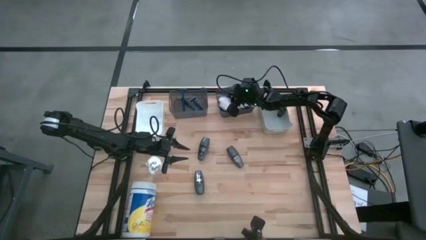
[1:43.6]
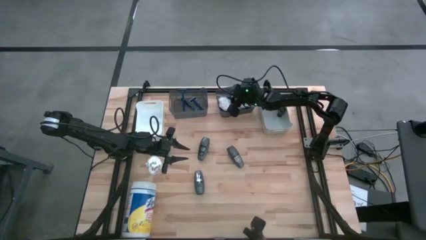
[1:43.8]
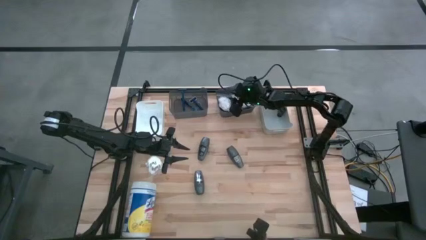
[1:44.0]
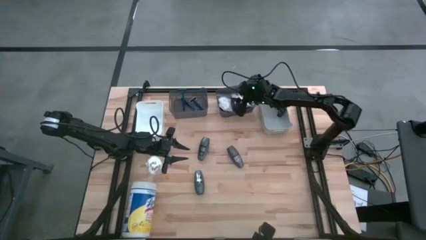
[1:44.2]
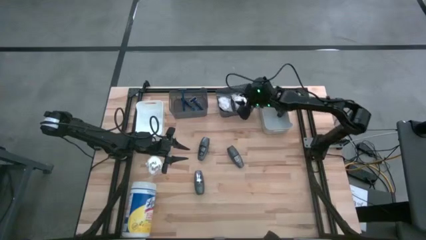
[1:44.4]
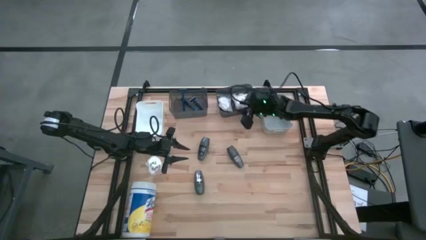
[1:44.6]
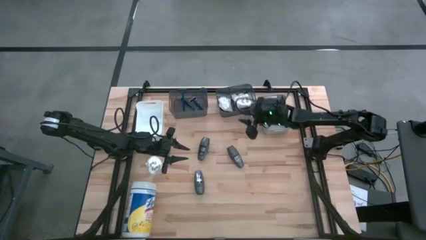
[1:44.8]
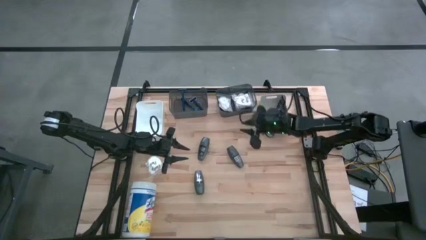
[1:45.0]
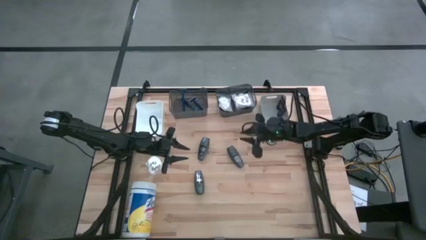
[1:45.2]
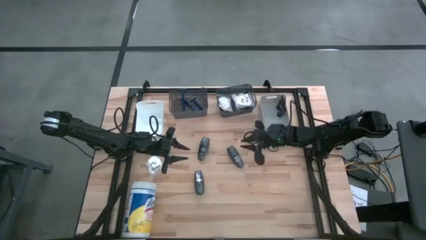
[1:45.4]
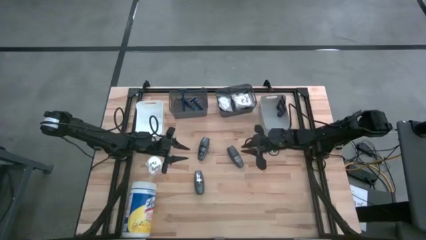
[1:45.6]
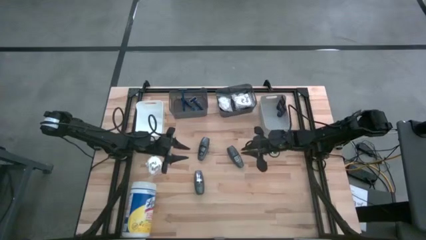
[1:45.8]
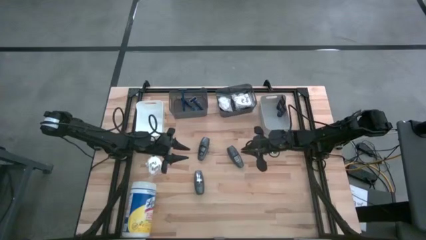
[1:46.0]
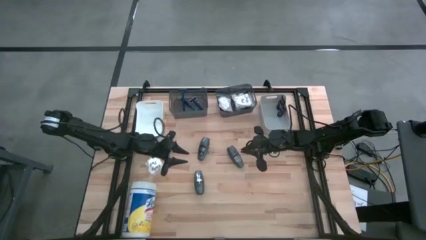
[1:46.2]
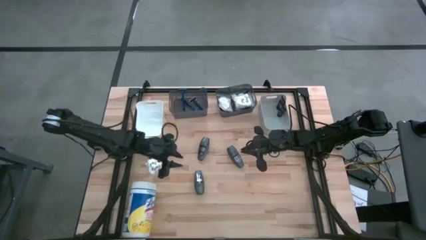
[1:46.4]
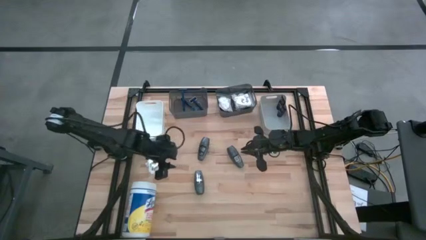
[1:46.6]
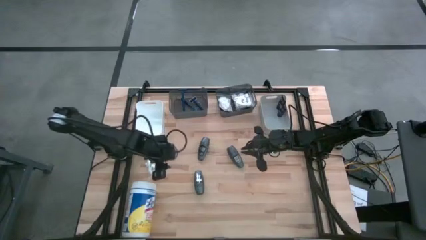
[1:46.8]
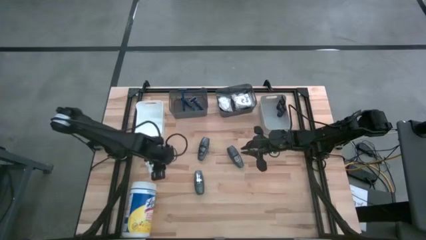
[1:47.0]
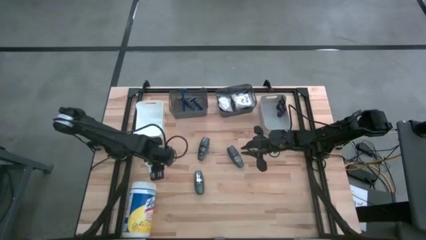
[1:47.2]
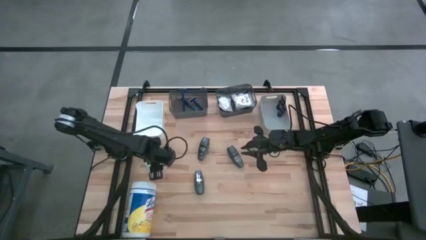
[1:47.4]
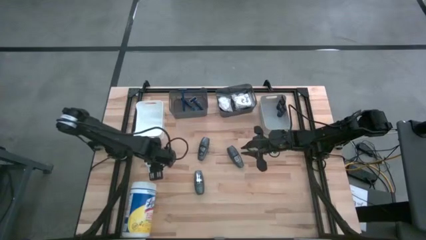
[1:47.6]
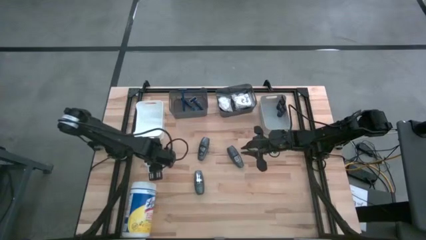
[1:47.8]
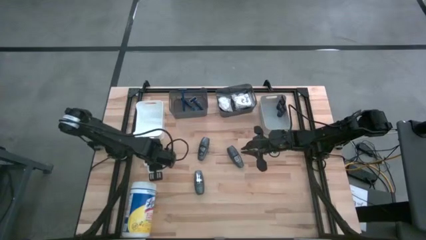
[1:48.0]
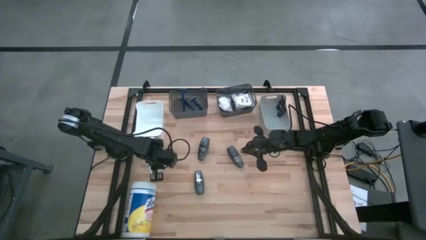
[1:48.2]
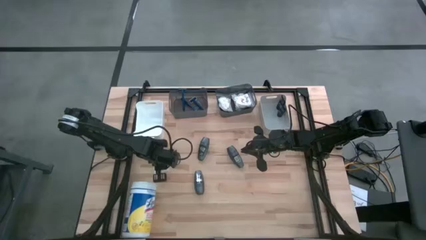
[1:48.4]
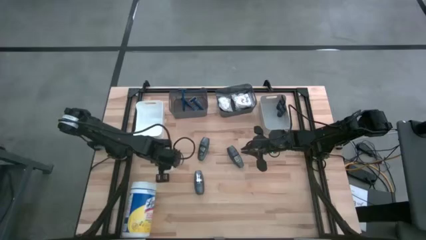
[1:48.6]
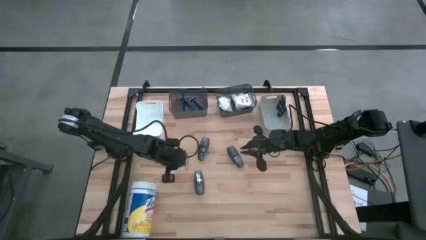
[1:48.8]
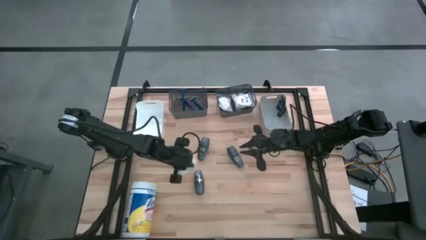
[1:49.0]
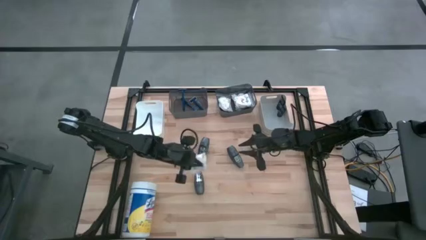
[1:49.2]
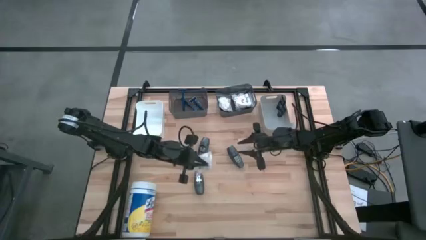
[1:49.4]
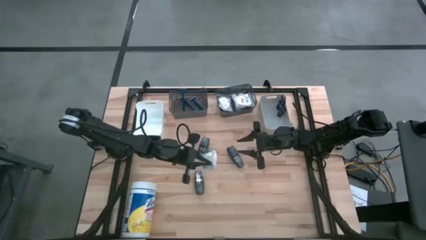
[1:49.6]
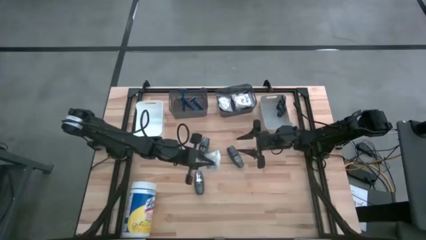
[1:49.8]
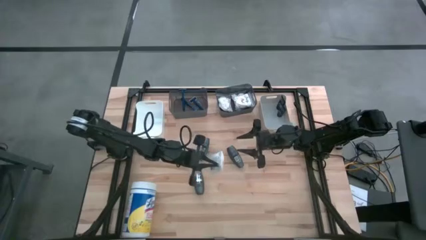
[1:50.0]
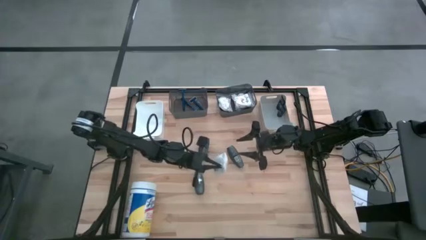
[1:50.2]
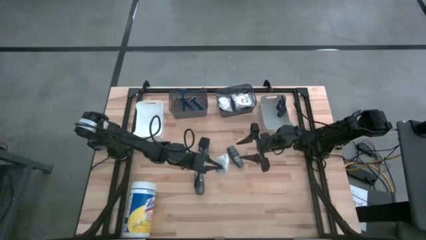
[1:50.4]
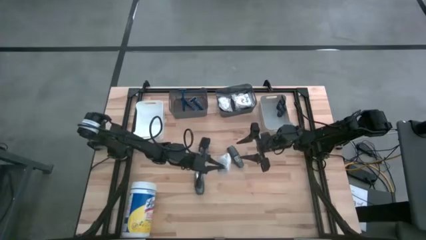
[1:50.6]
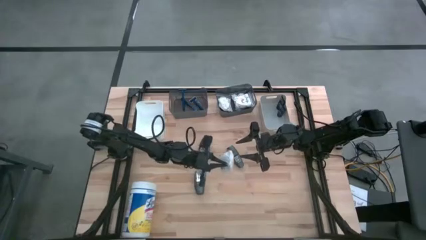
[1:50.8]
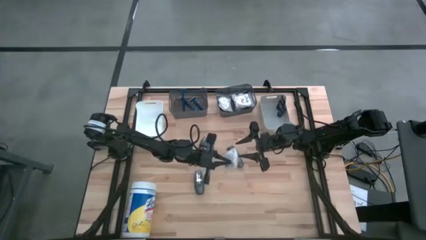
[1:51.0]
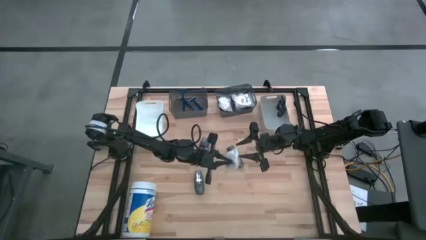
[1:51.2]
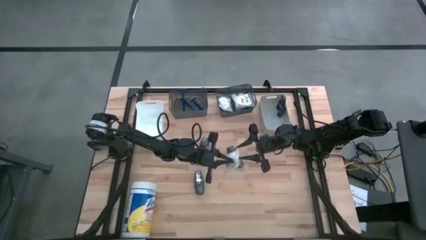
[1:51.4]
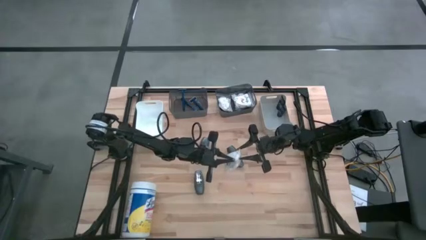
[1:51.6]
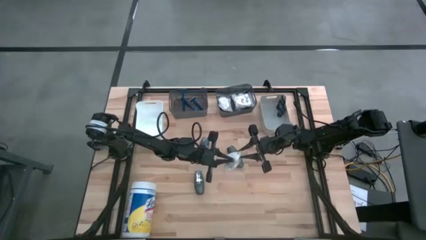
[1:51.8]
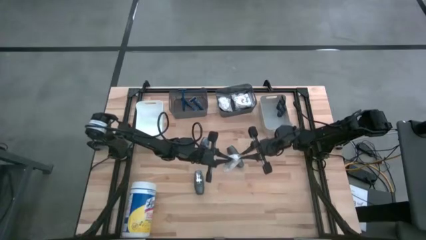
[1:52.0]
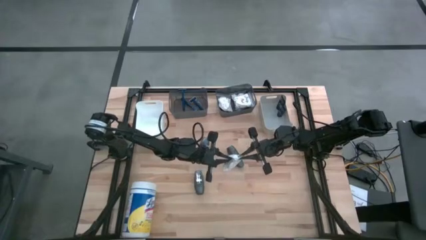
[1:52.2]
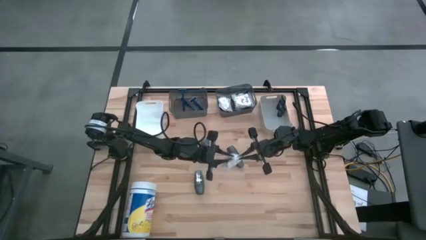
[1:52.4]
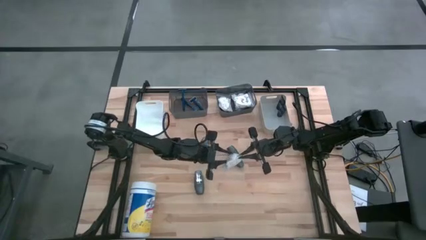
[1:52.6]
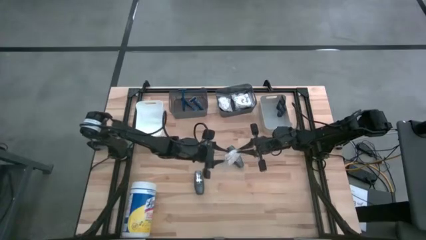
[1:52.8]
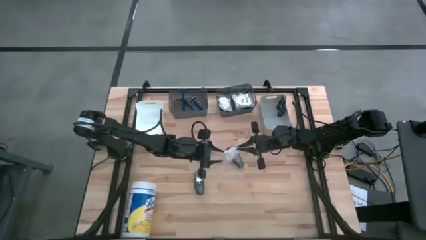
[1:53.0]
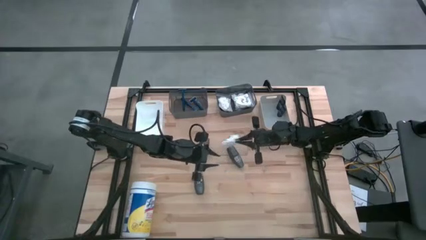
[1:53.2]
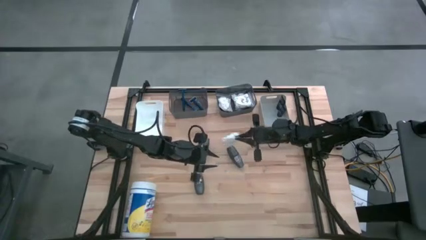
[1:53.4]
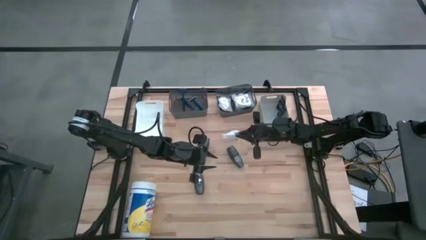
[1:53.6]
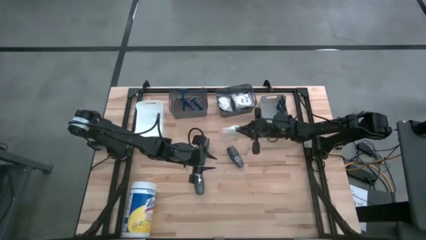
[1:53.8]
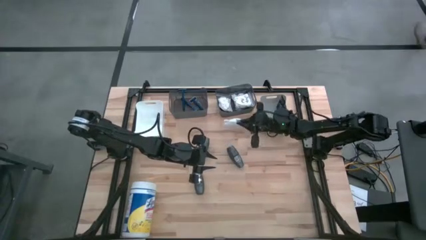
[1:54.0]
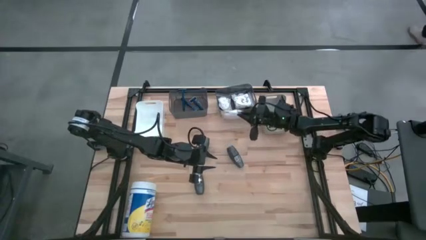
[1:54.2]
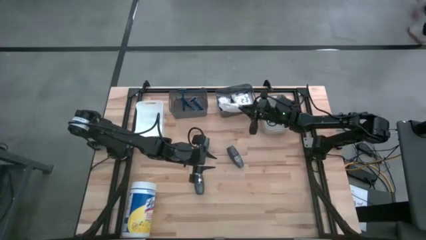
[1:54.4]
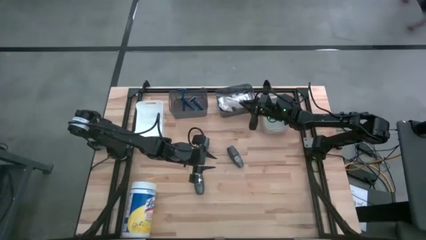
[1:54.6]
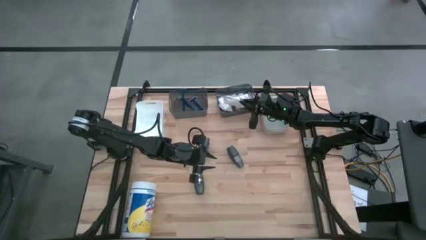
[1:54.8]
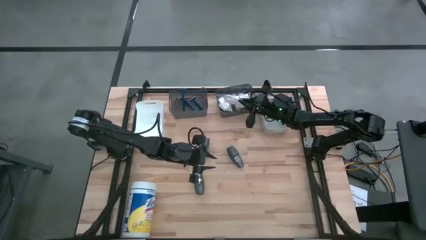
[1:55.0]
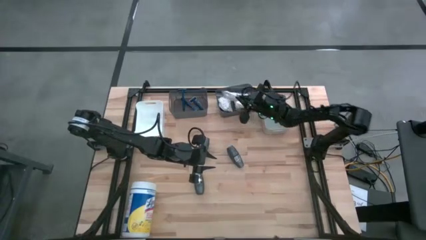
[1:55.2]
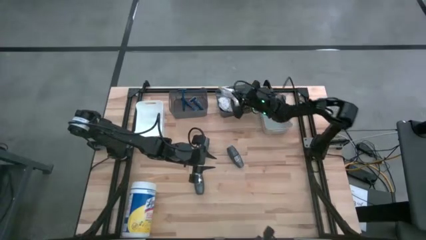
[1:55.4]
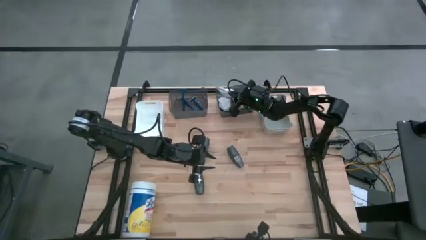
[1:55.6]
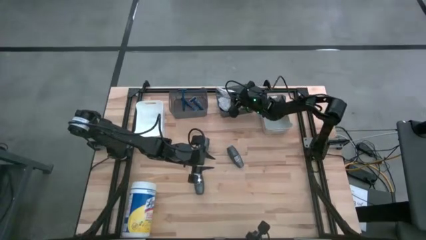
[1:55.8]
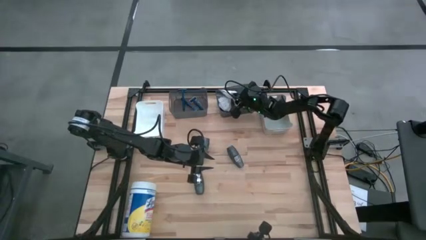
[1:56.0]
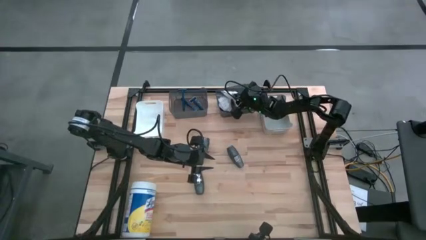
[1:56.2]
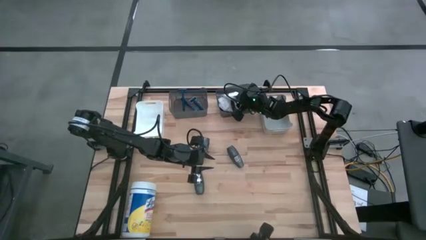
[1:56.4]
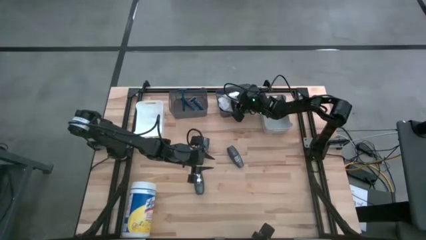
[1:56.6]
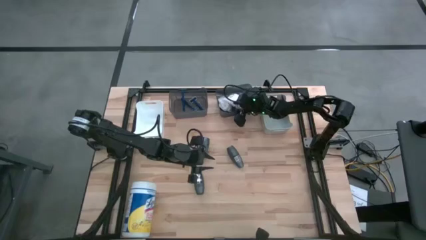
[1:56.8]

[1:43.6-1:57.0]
Task: Pick & Place Travel size toiletries
Put the white cotton pack into the right black bin
